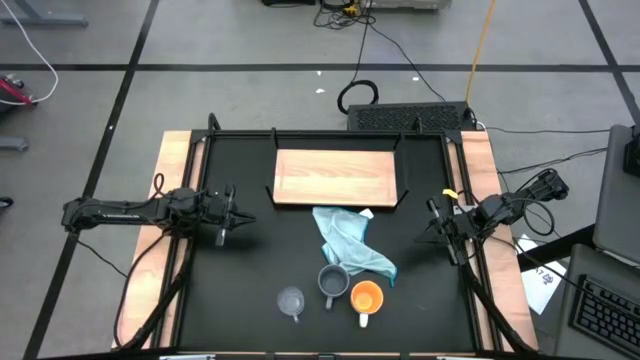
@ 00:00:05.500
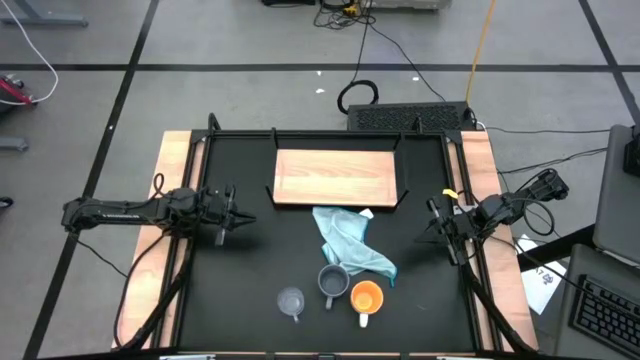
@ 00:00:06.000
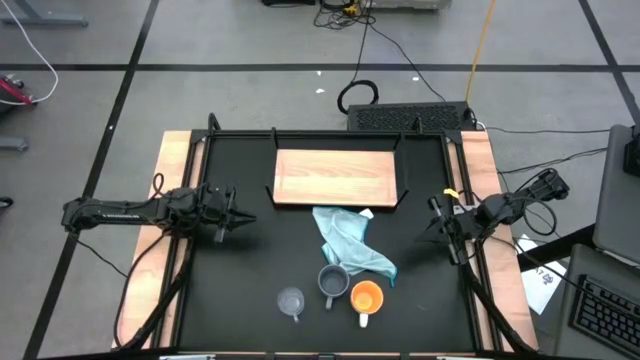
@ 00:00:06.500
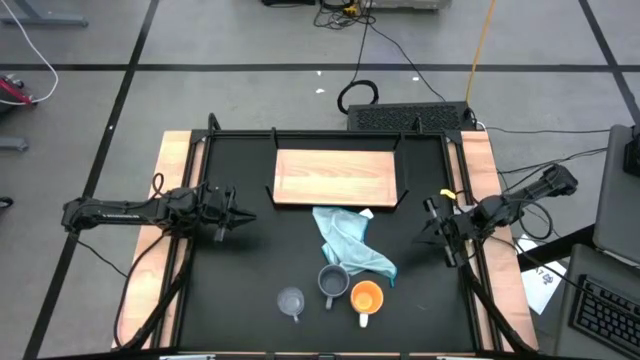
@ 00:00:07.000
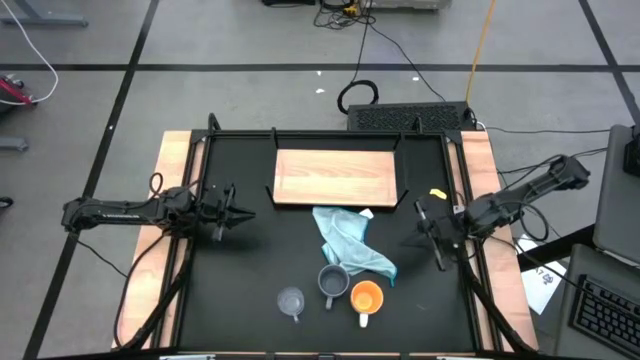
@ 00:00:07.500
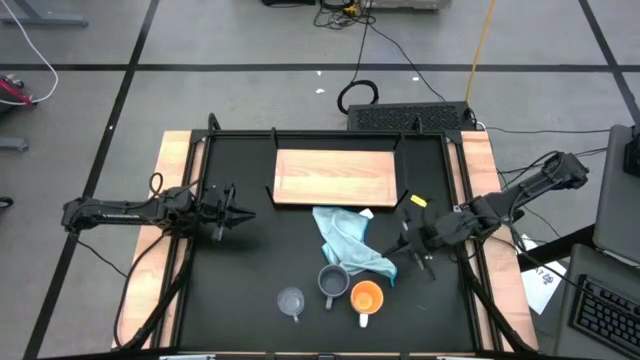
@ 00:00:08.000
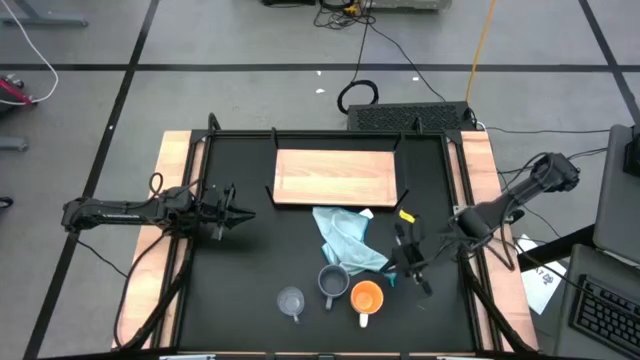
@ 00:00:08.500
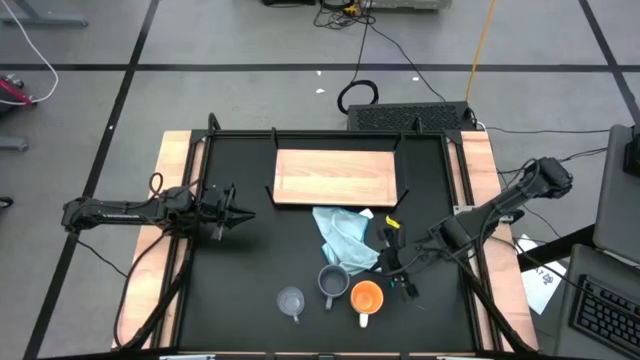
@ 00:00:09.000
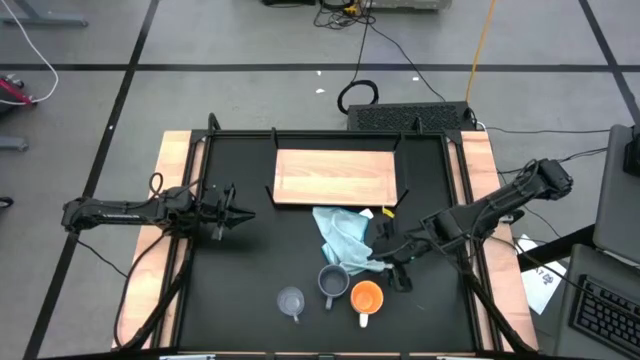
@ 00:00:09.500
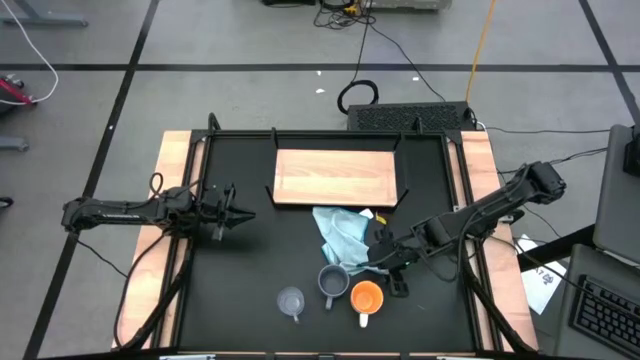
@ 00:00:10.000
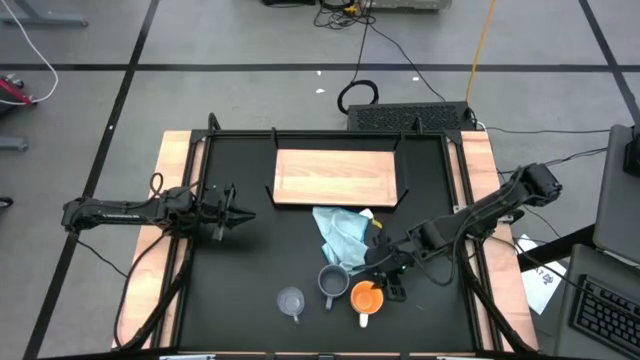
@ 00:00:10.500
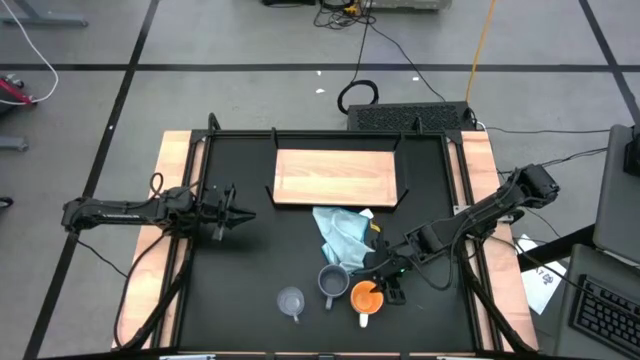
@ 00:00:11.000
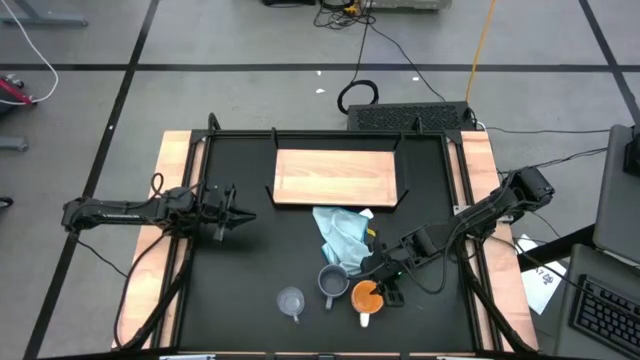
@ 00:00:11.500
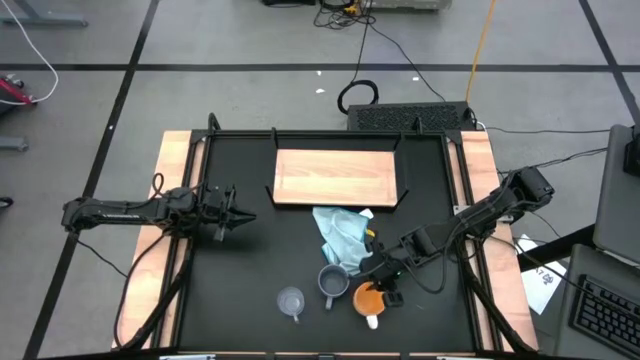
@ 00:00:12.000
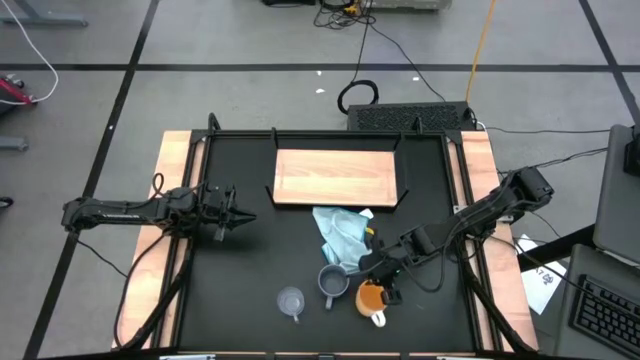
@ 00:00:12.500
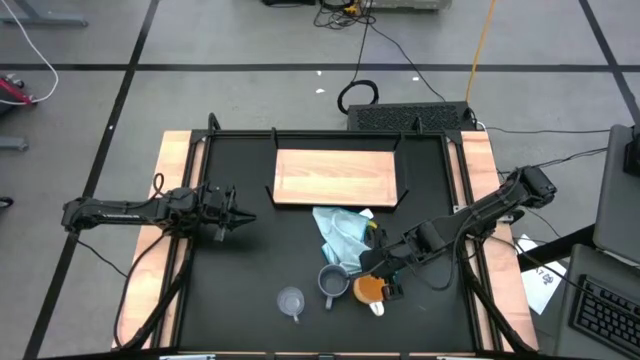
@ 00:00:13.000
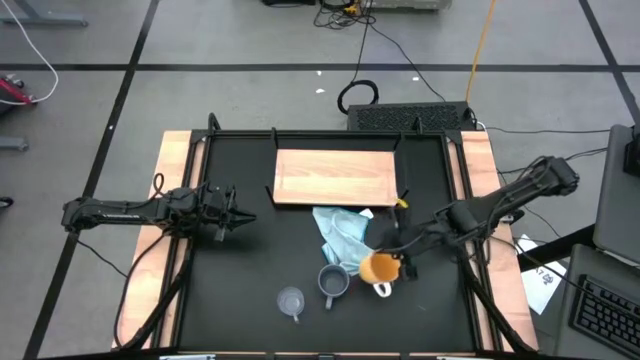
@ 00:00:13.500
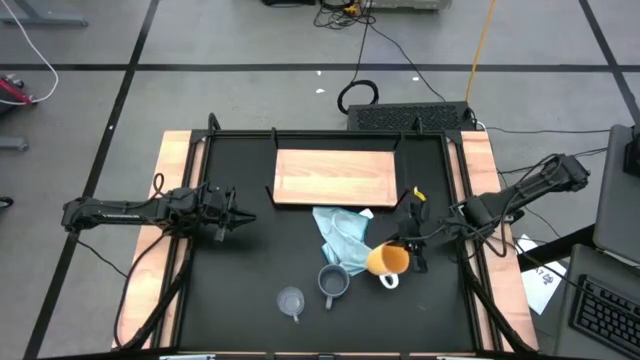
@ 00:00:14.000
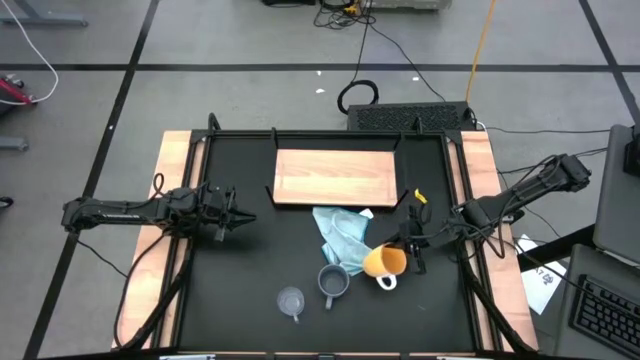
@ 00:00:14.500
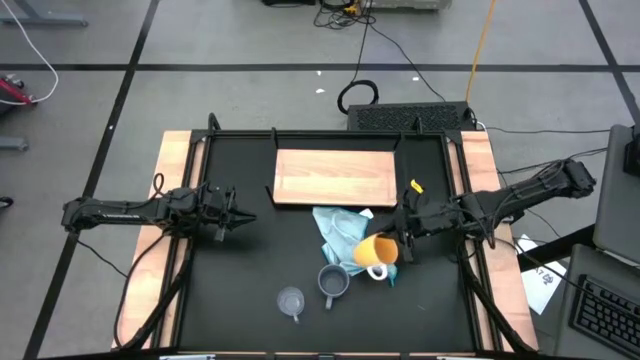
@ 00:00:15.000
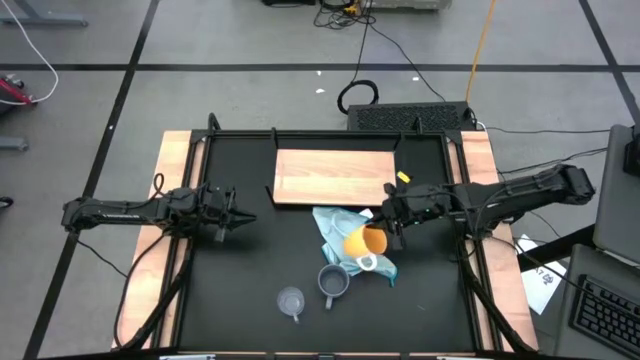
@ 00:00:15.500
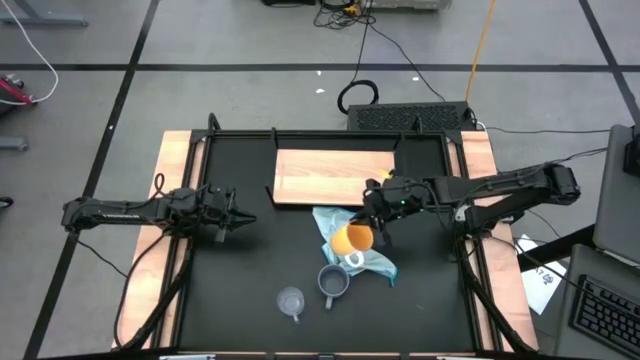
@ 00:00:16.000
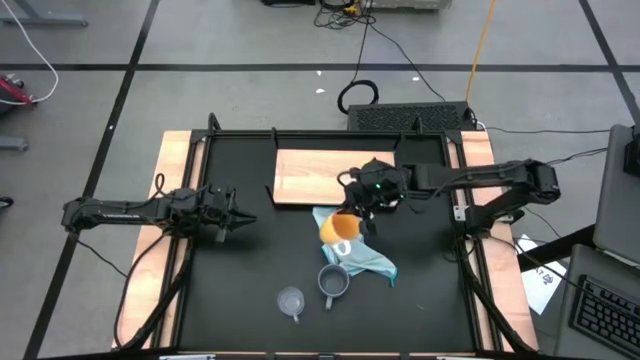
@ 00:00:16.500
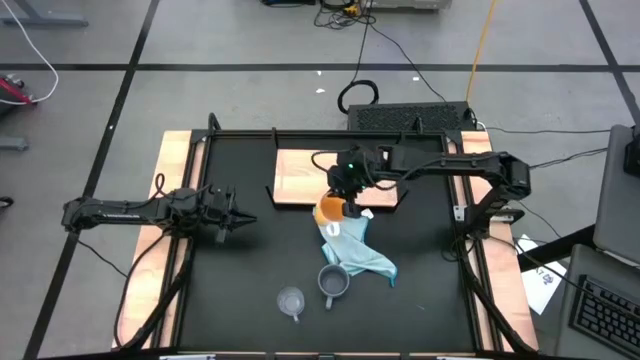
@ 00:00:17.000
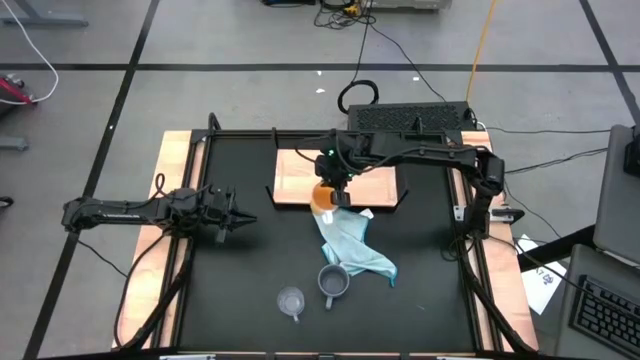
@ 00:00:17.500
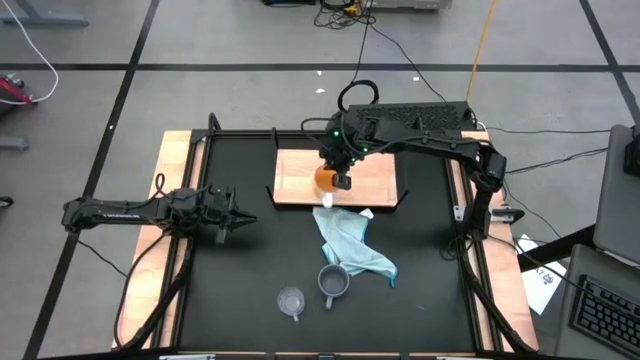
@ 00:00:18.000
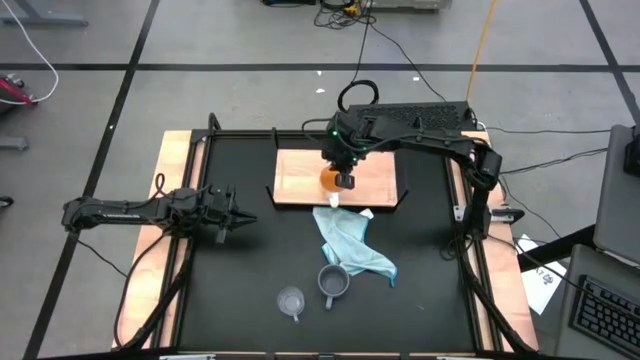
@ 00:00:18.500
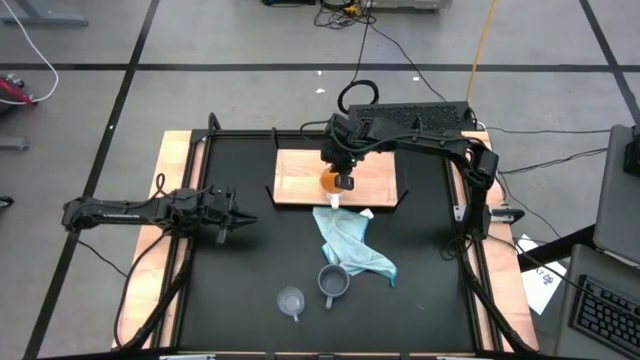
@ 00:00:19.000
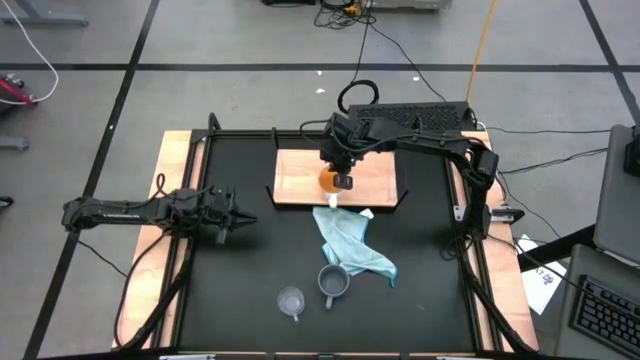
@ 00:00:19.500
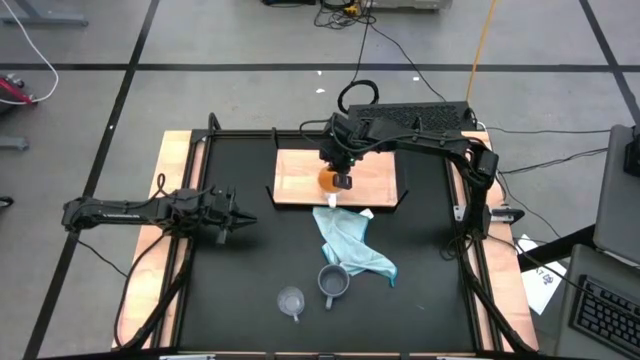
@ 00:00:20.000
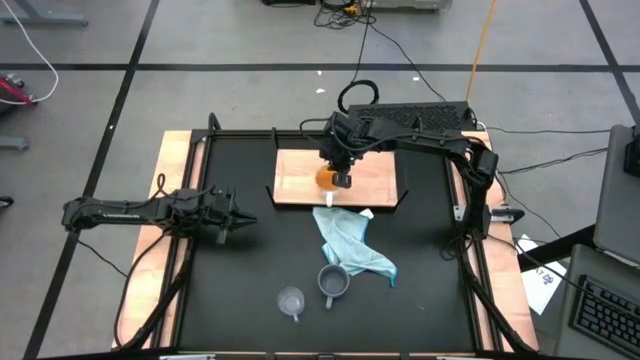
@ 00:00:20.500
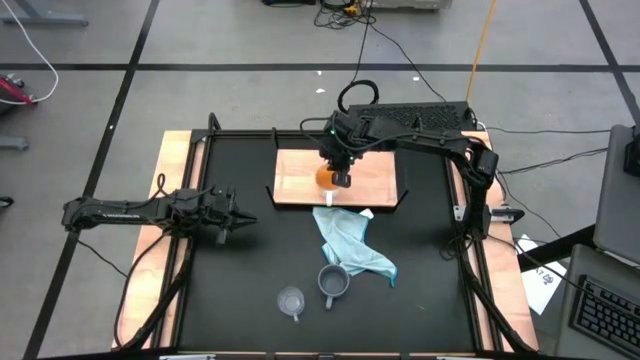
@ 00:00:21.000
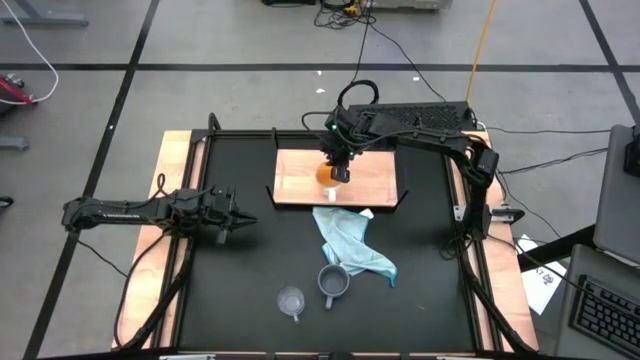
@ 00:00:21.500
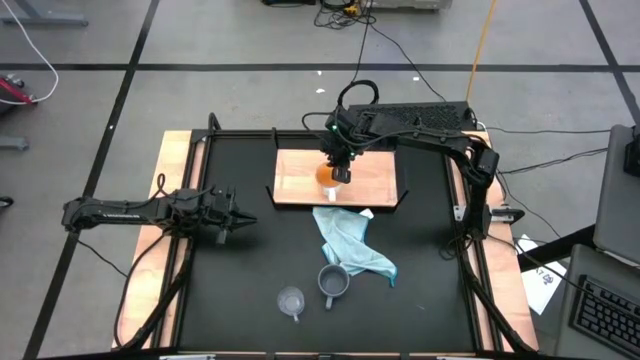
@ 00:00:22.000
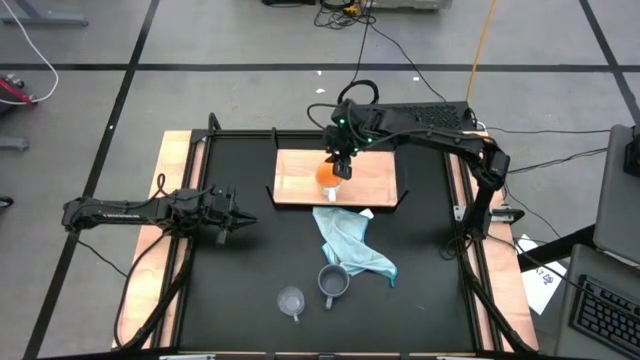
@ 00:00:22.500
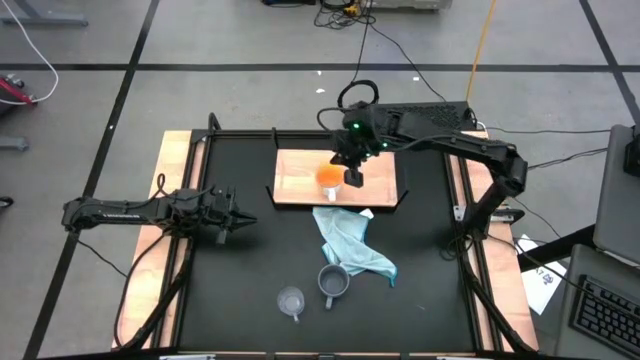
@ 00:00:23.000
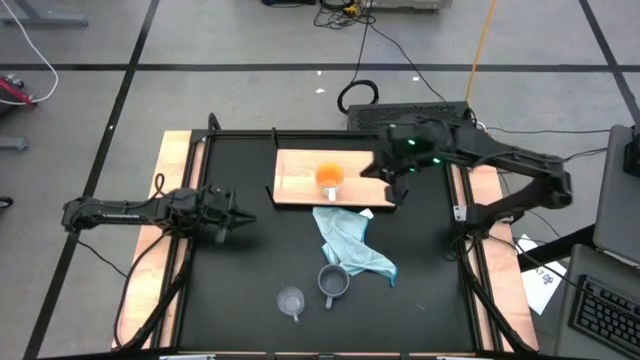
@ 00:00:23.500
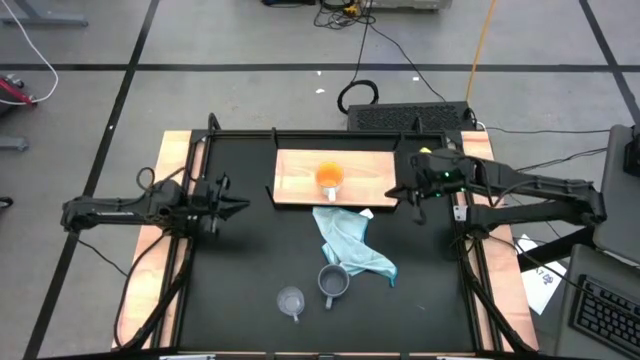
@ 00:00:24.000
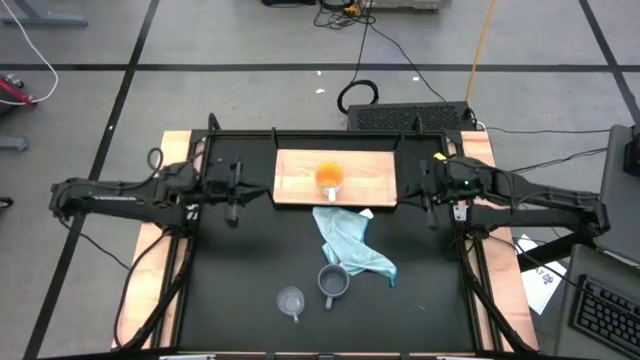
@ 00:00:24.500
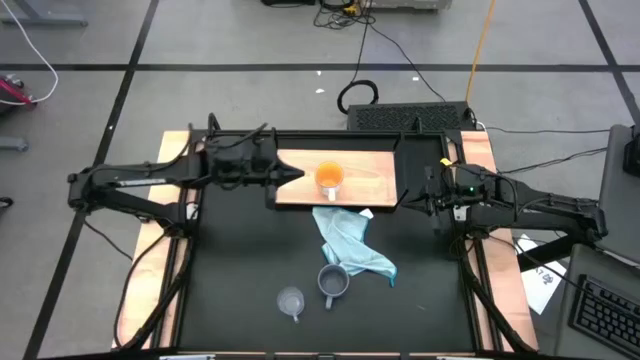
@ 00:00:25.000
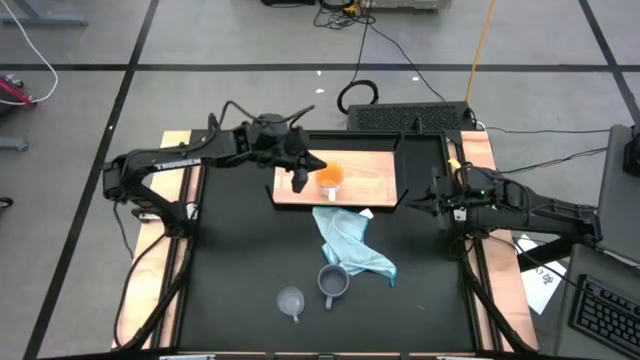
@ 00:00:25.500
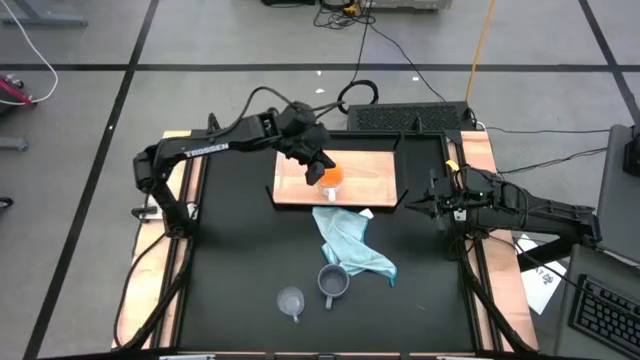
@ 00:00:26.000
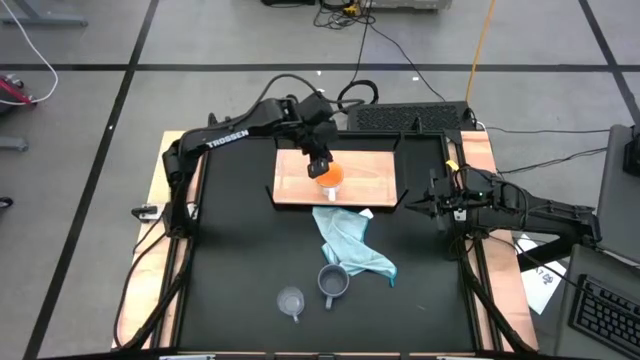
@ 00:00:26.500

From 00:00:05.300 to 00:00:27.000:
Task: Stack small to large cups/mugs on shelf
Put the yellow mug on the shelf
